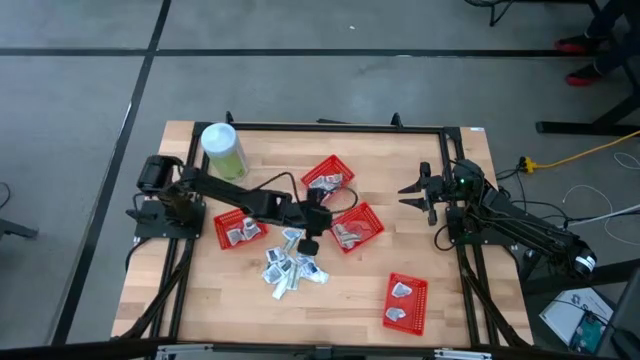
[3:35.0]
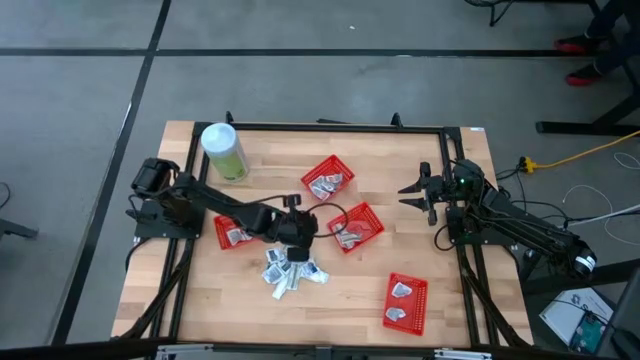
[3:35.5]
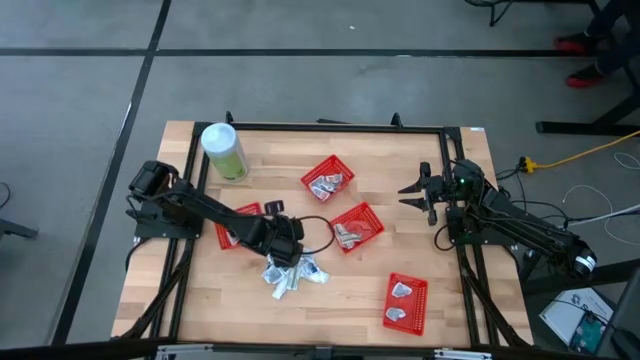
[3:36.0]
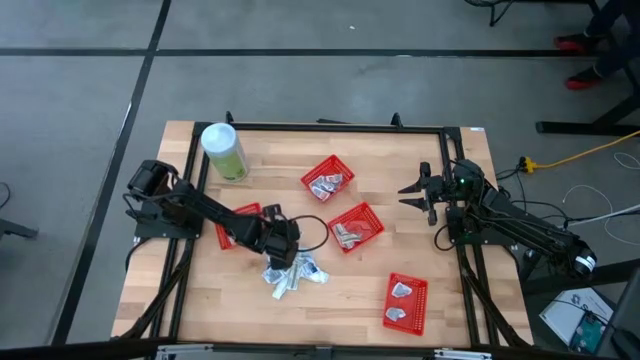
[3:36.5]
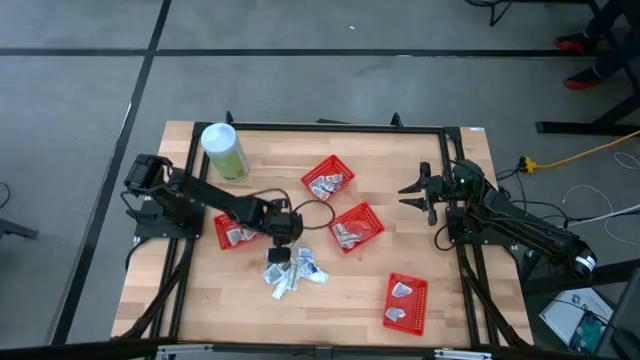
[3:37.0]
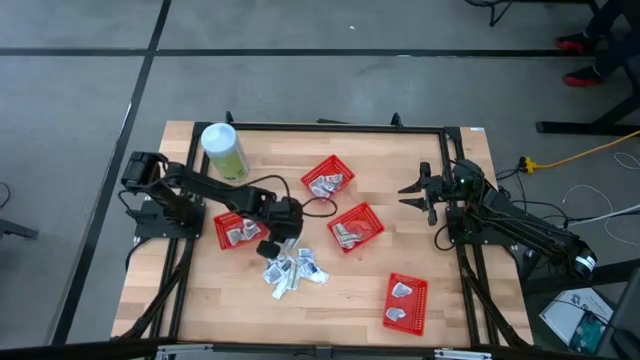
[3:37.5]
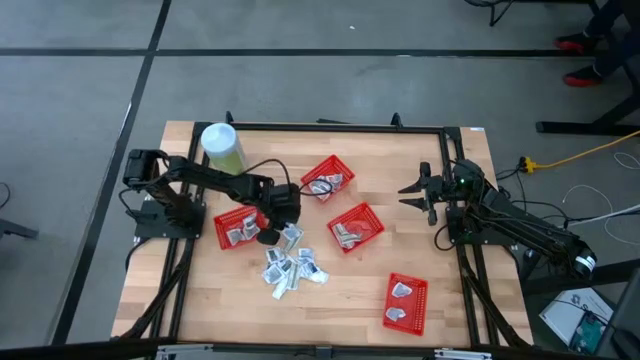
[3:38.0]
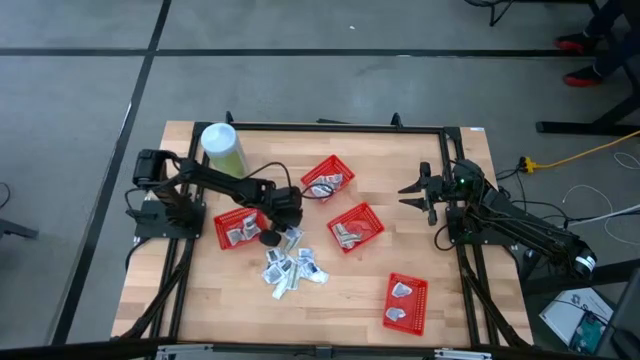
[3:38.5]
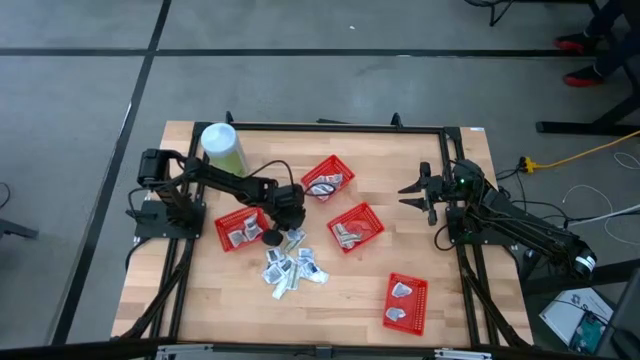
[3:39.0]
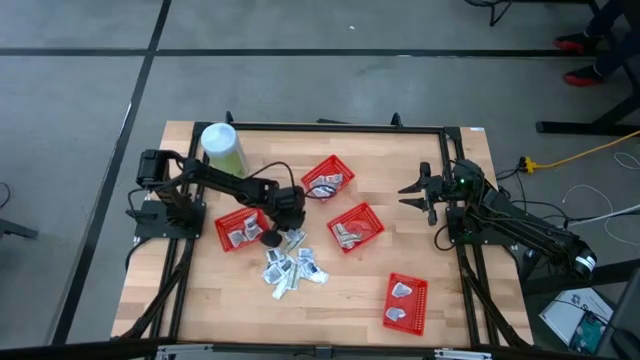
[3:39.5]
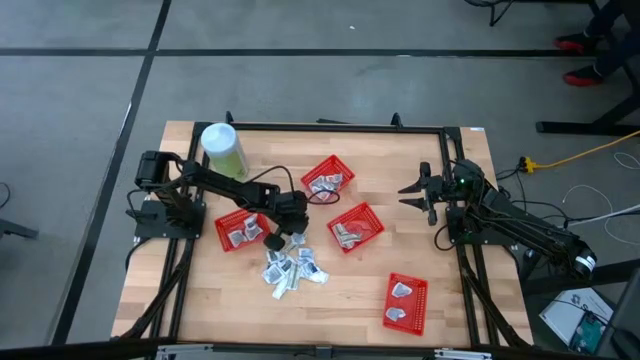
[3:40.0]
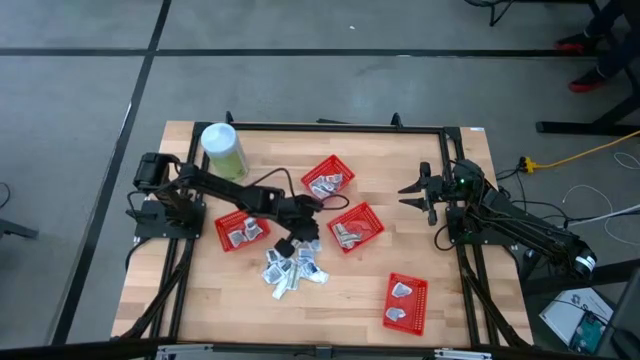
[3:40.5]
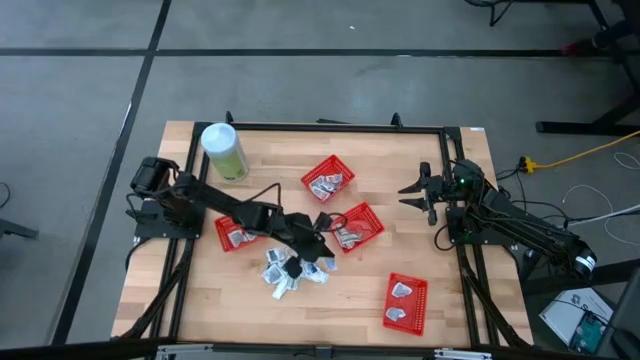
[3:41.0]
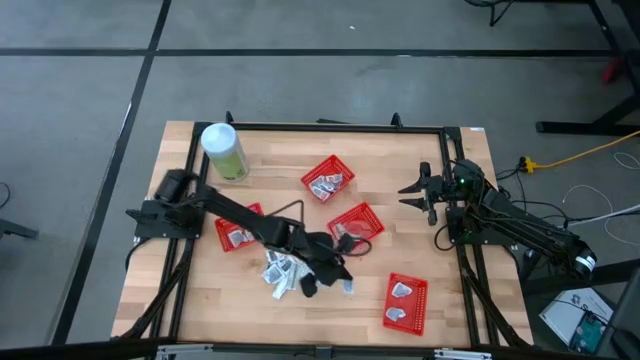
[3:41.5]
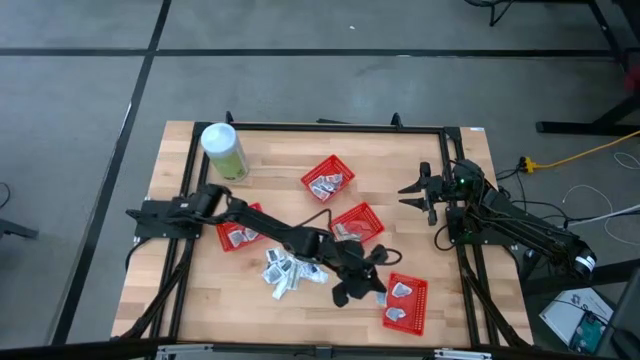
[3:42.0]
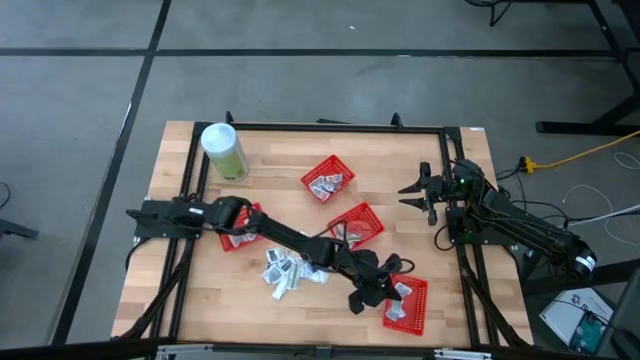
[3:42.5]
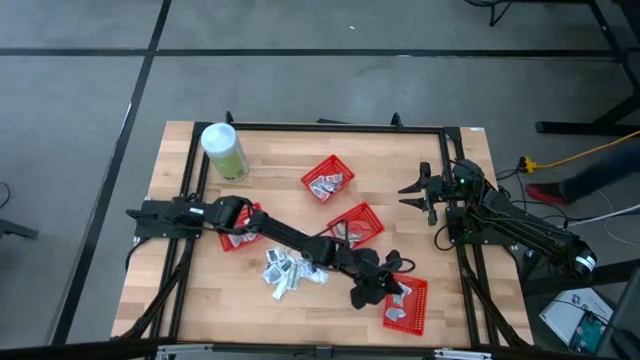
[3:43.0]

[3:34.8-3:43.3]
Task: Pick & Place First Aid Supplies
Put the blue alcohol pad into the red container

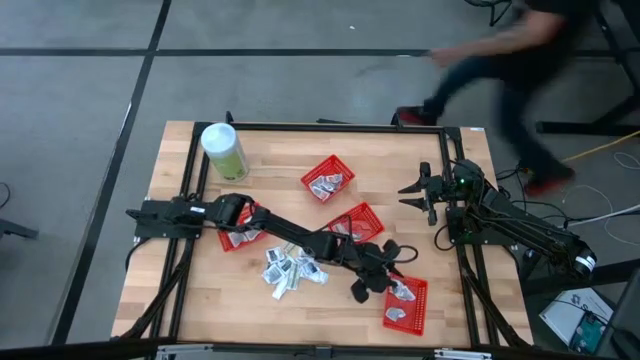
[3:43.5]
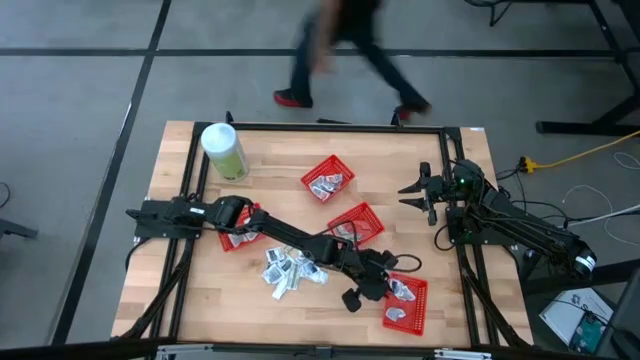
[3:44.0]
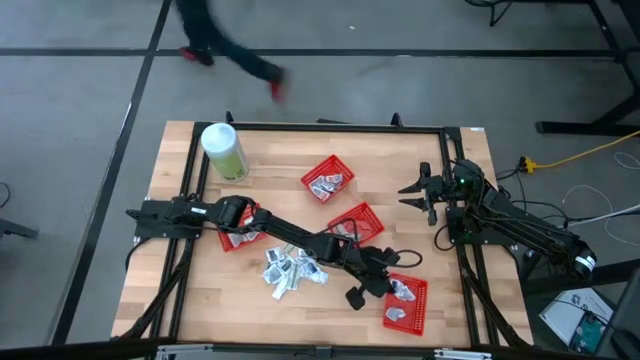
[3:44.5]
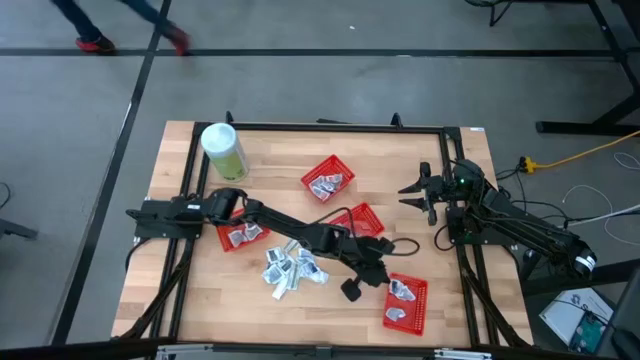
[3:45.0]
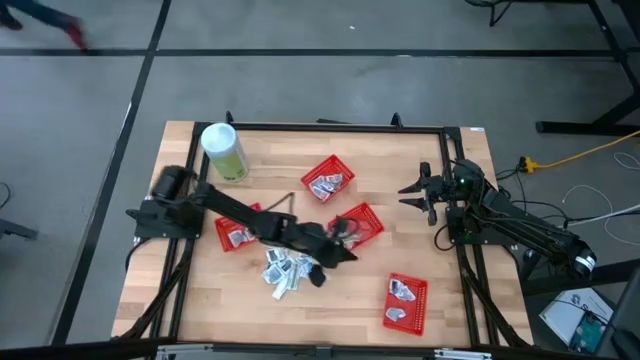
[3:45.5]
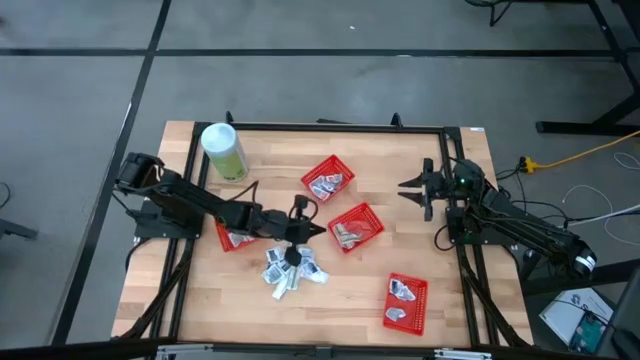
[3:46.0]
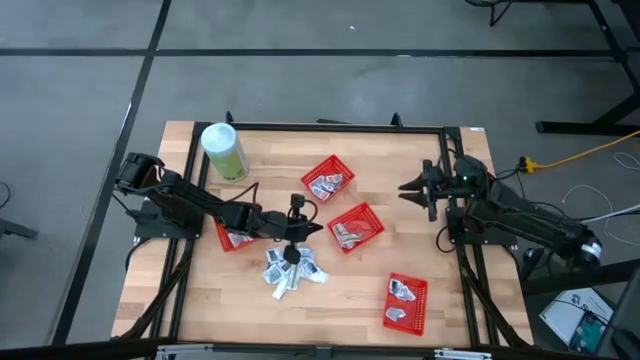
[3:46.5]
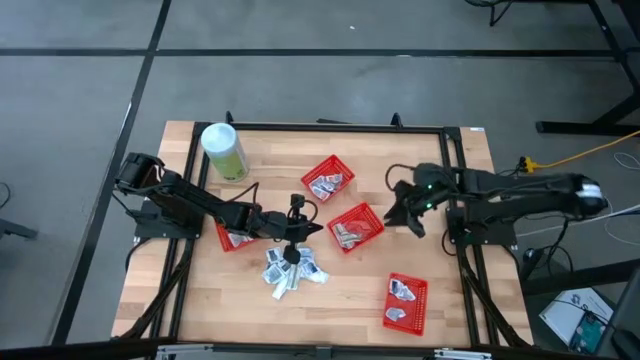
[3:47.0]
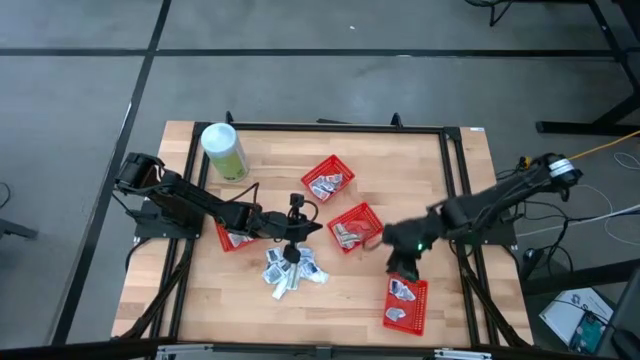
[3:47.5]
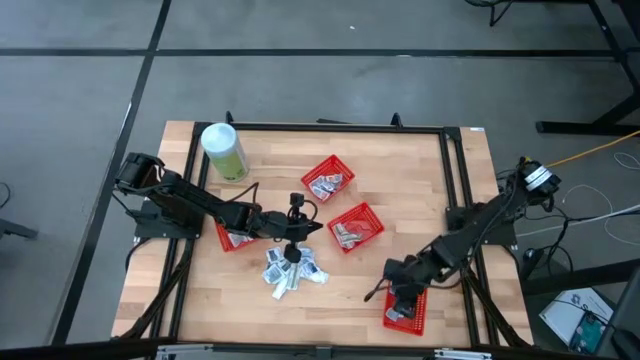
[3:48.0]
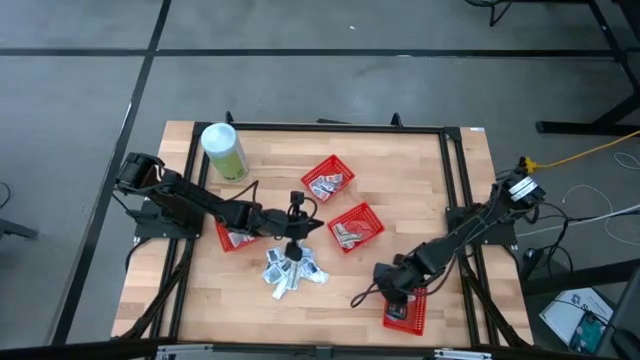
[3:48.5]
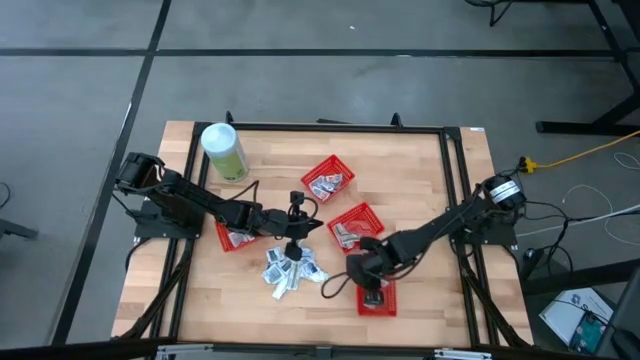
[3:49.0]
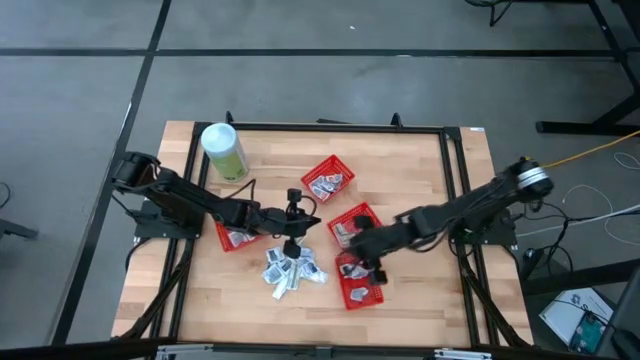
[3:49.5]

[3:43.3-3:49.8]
Adjust the red container

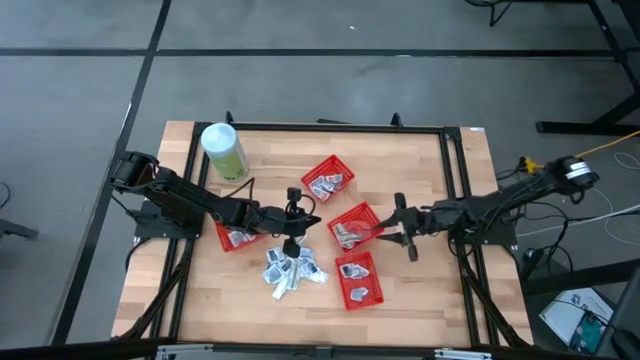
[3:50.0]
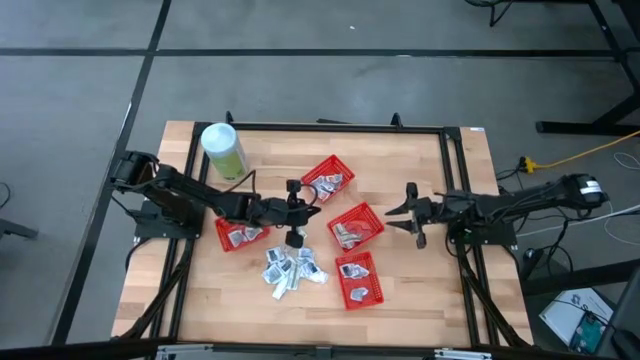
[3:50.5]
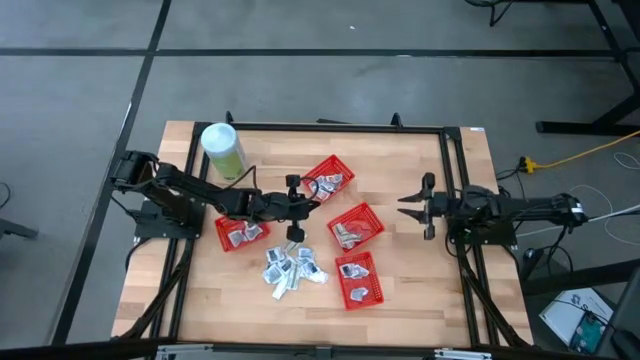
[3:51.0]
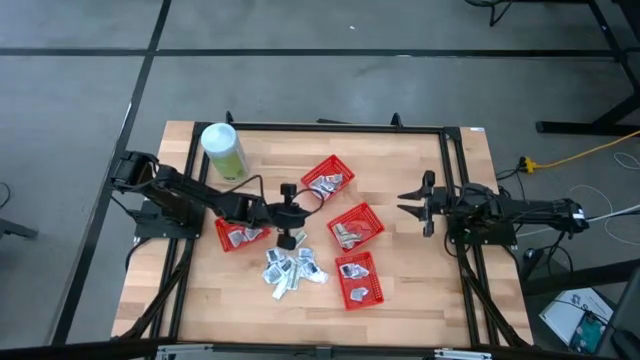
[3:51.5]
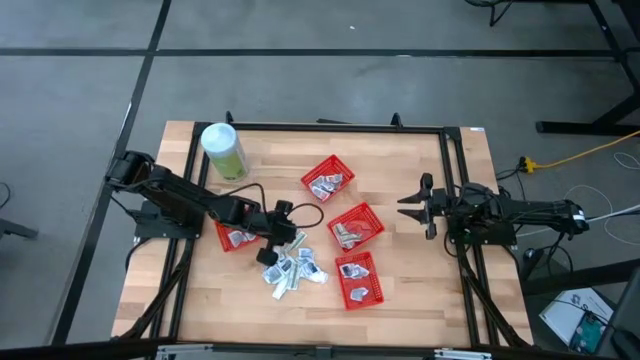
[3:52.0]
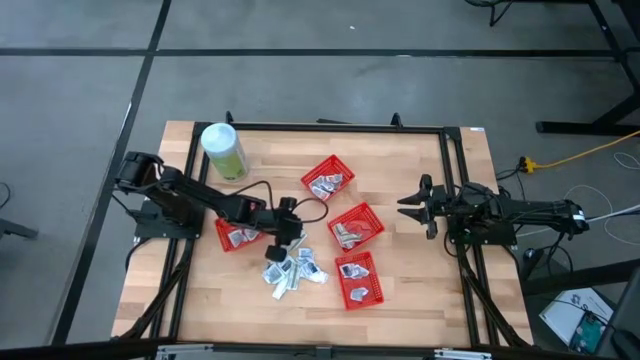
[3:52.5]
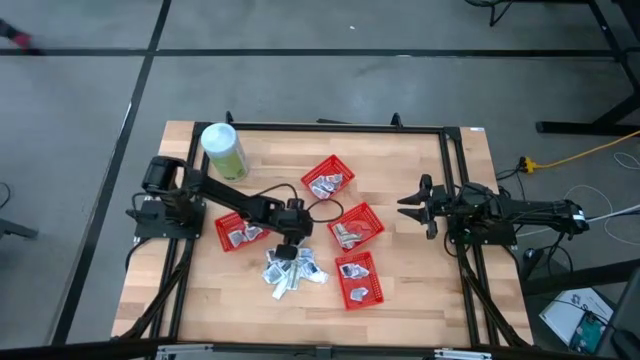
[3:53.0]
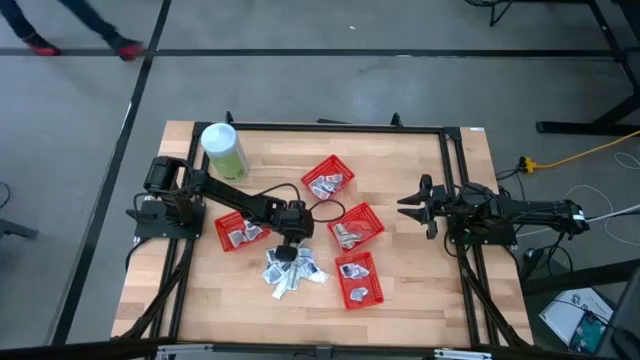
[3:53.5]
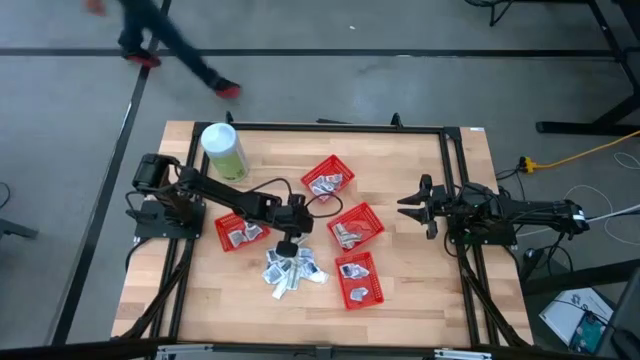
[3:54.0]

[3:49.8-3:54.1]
Put the green bandage into the red container

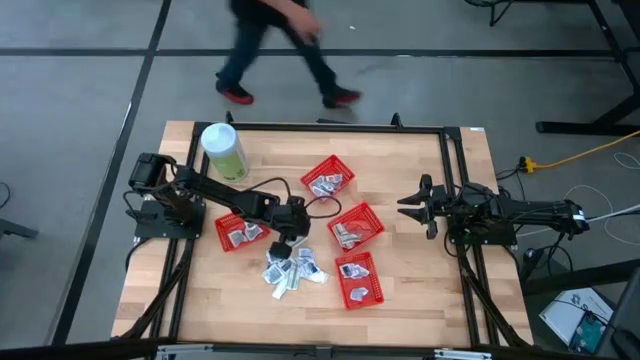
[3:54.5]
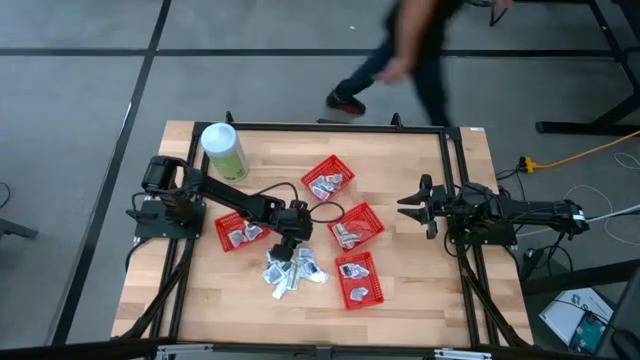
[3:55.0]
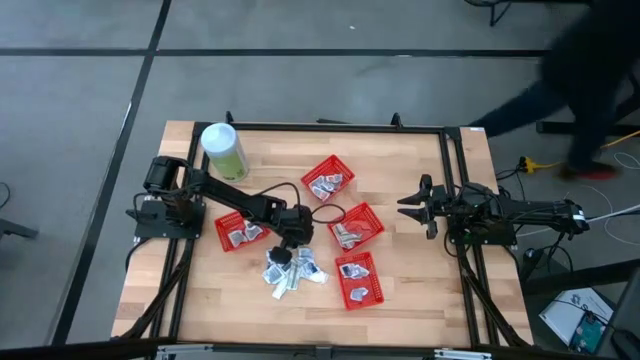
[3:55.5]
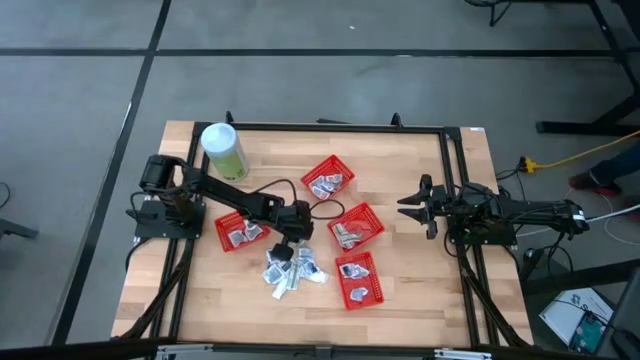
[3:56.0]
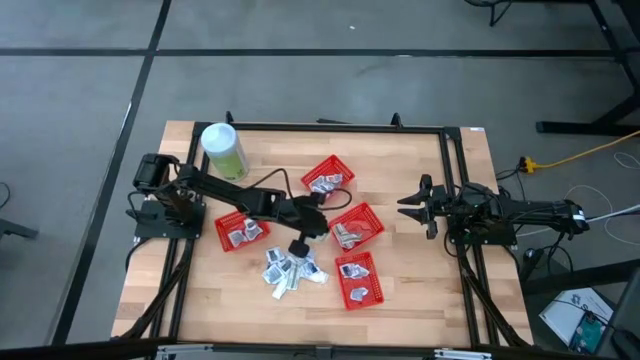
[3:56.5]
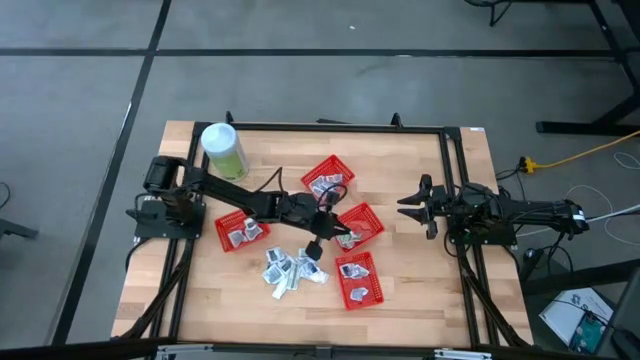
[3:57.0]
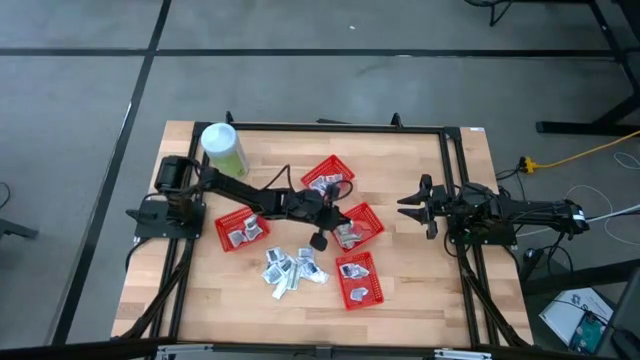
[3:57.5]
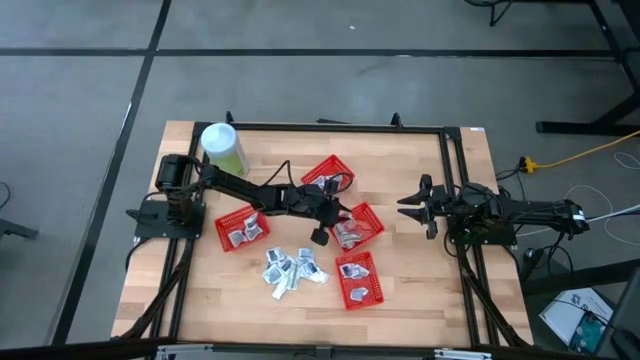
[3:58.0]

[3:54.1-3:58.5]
Put the green bandage into the red container
